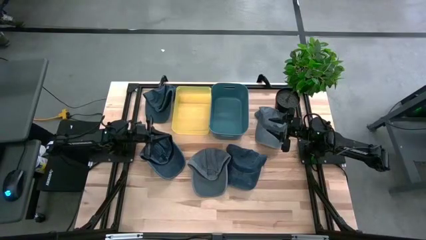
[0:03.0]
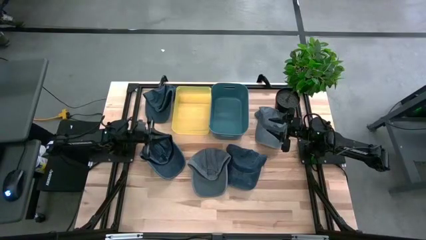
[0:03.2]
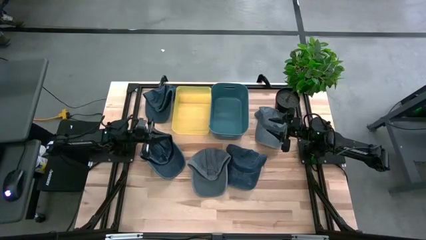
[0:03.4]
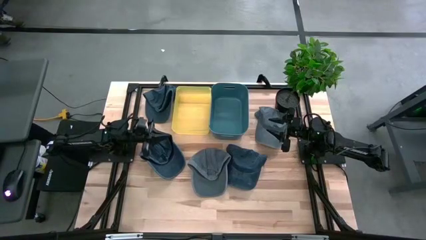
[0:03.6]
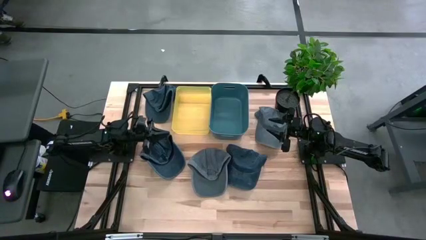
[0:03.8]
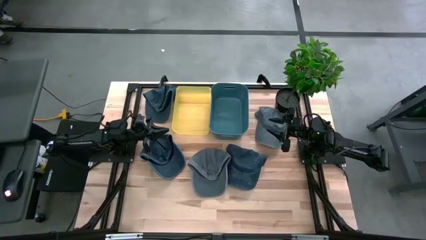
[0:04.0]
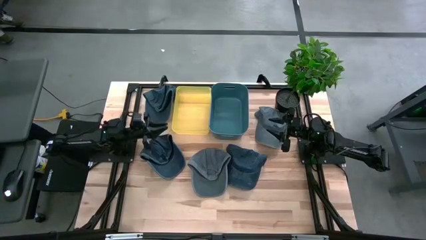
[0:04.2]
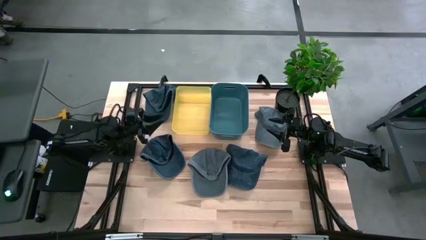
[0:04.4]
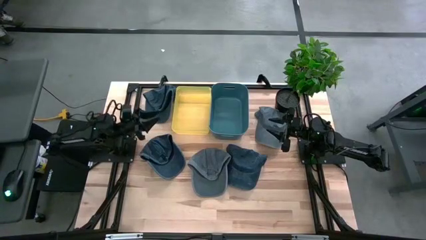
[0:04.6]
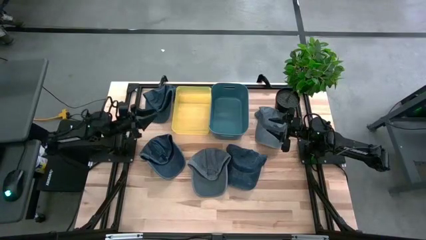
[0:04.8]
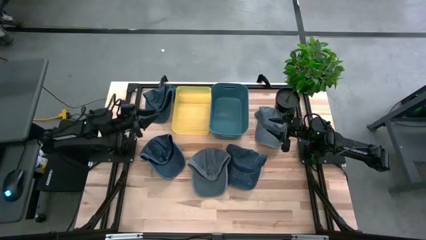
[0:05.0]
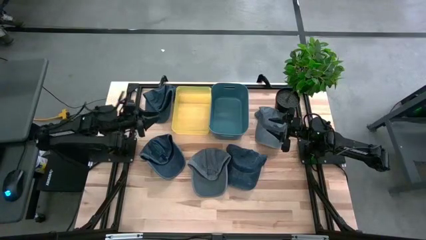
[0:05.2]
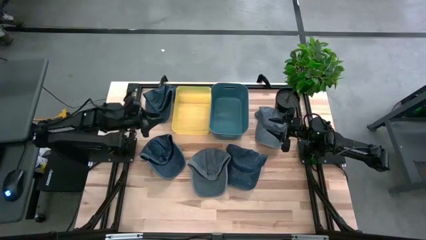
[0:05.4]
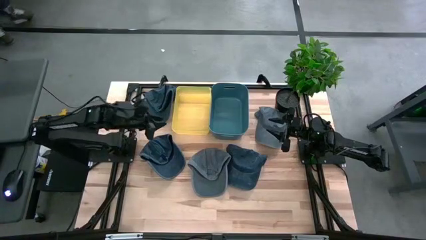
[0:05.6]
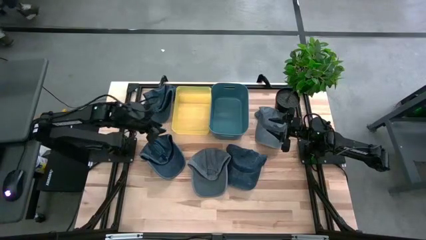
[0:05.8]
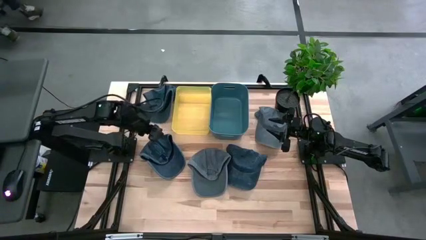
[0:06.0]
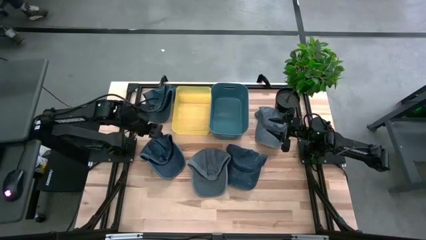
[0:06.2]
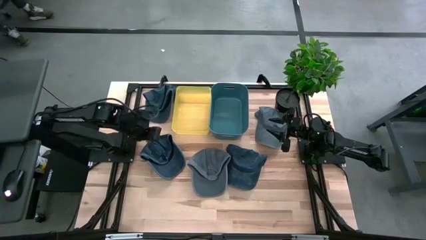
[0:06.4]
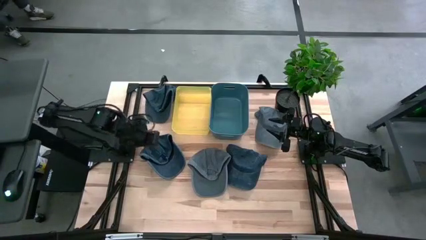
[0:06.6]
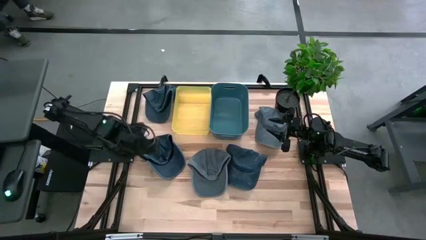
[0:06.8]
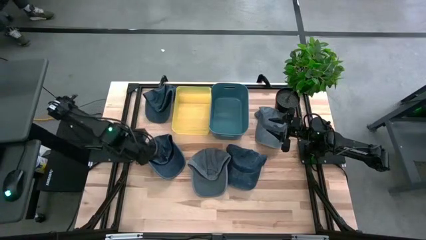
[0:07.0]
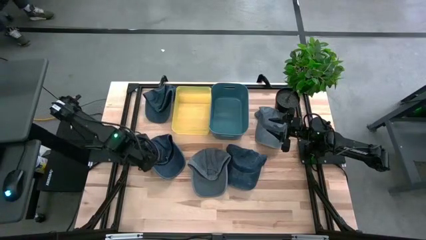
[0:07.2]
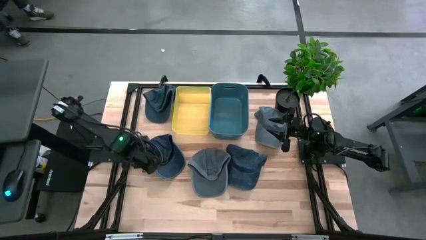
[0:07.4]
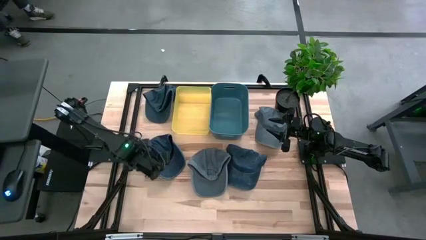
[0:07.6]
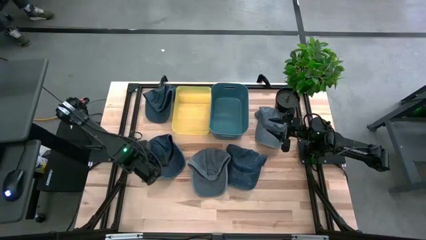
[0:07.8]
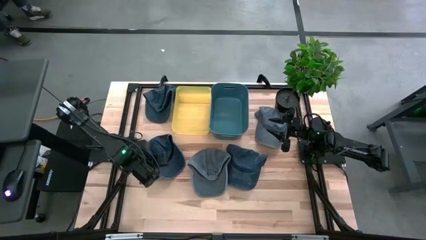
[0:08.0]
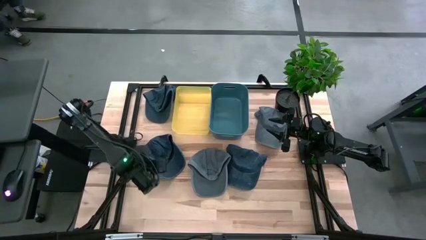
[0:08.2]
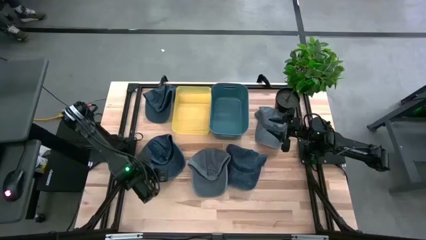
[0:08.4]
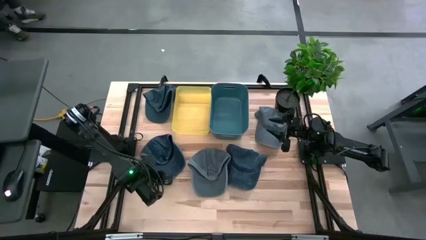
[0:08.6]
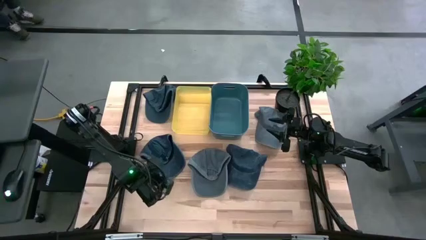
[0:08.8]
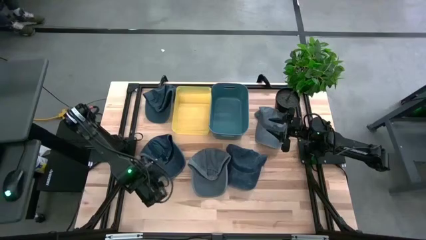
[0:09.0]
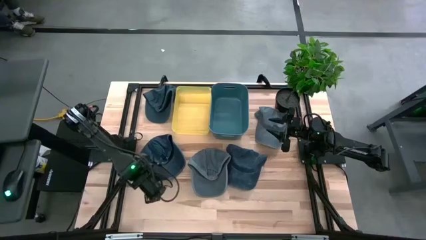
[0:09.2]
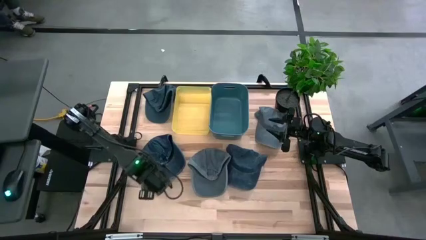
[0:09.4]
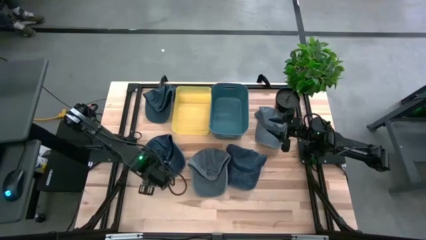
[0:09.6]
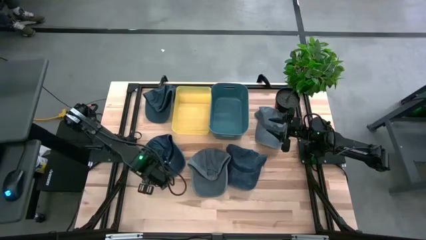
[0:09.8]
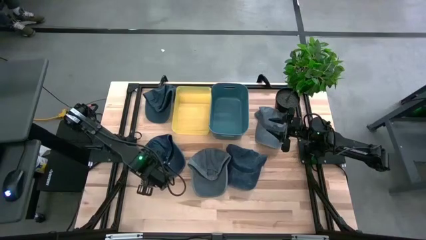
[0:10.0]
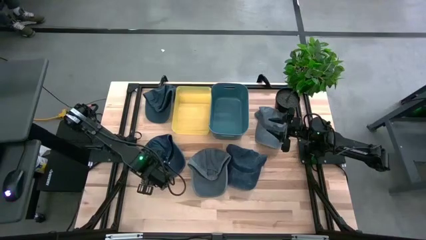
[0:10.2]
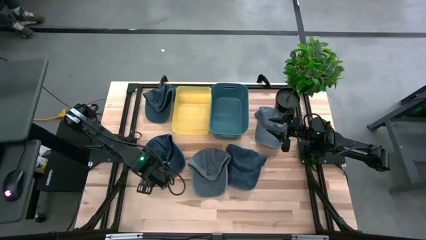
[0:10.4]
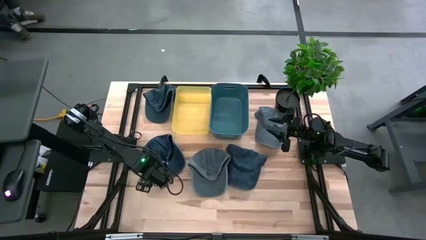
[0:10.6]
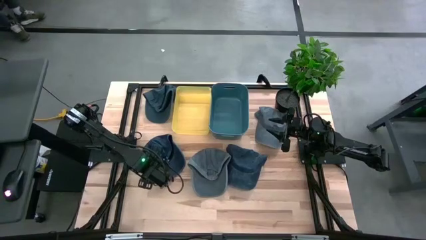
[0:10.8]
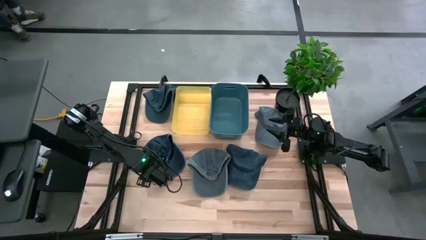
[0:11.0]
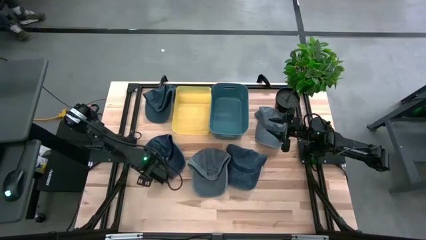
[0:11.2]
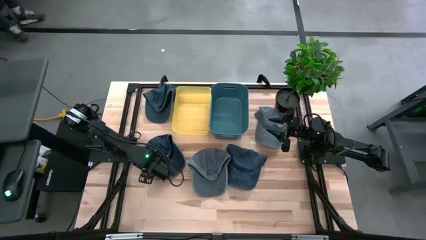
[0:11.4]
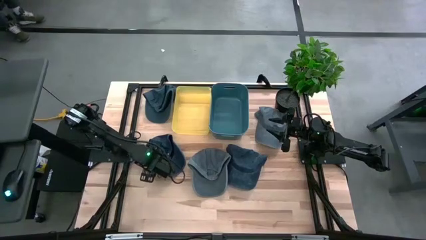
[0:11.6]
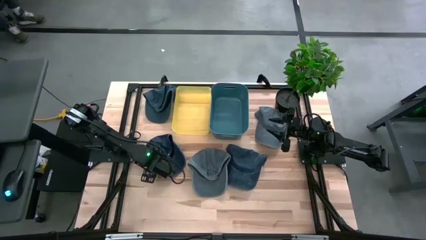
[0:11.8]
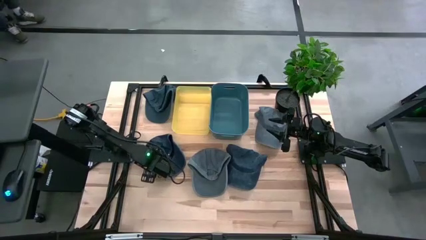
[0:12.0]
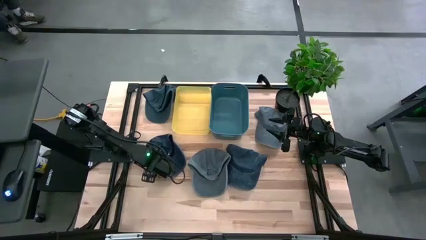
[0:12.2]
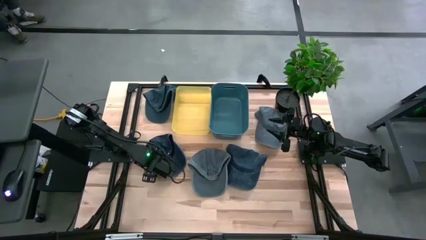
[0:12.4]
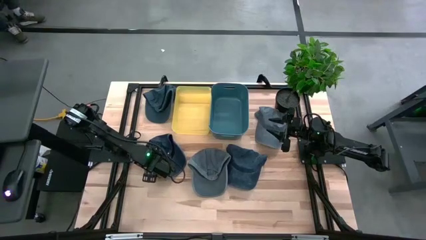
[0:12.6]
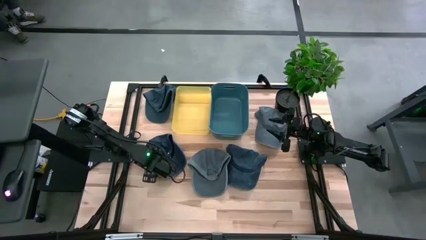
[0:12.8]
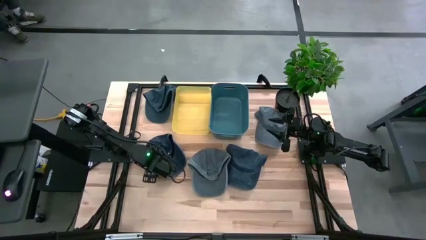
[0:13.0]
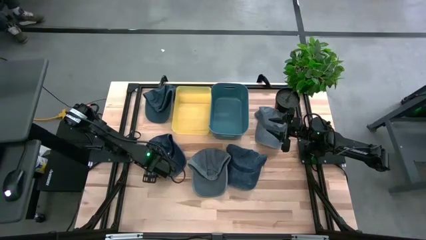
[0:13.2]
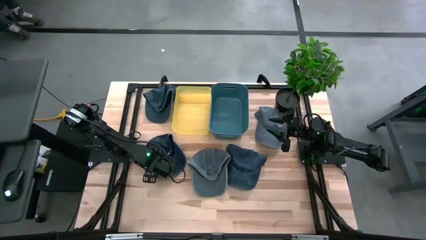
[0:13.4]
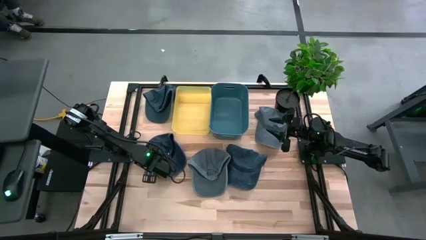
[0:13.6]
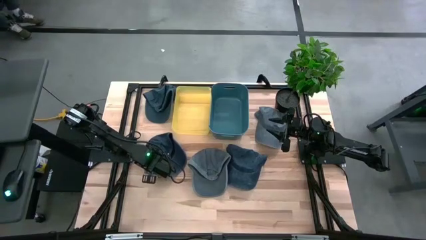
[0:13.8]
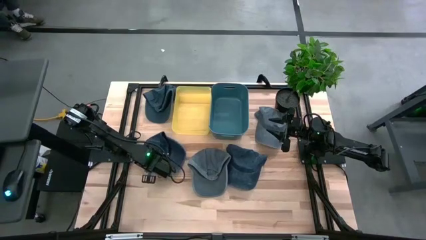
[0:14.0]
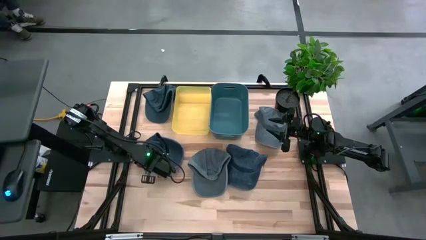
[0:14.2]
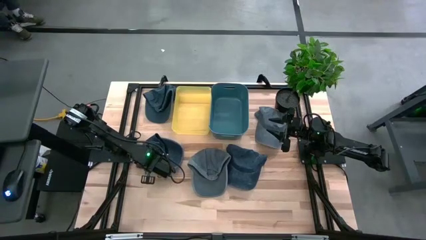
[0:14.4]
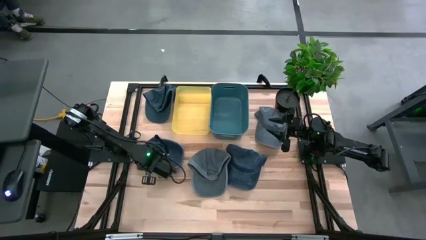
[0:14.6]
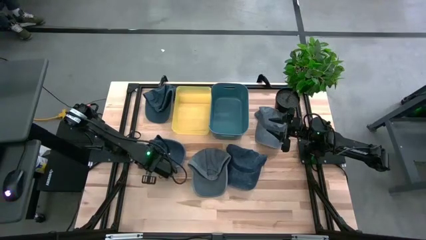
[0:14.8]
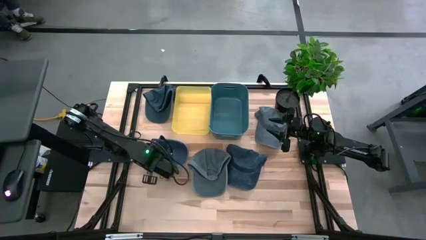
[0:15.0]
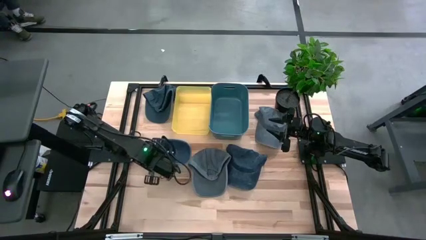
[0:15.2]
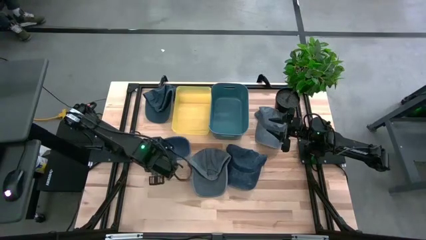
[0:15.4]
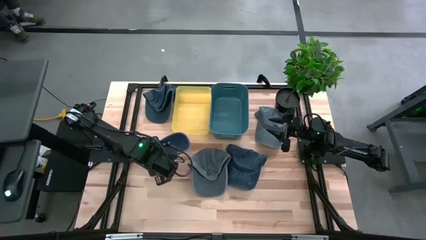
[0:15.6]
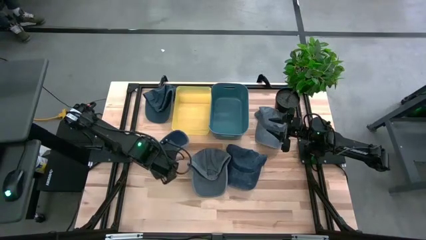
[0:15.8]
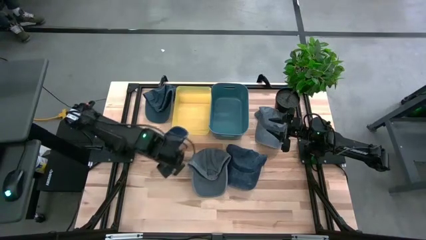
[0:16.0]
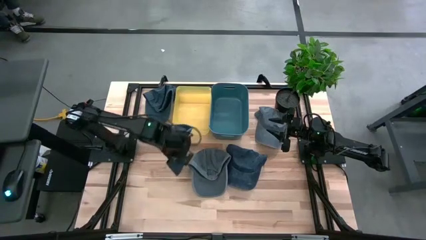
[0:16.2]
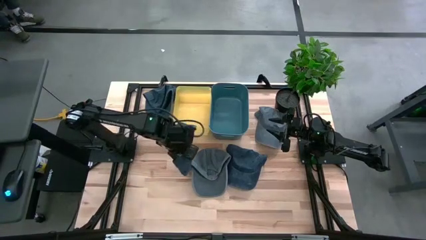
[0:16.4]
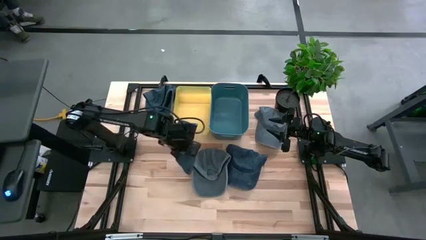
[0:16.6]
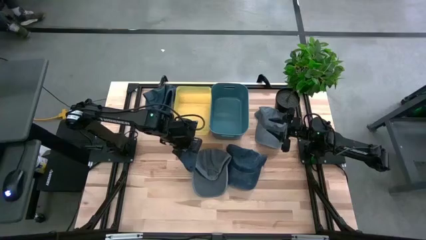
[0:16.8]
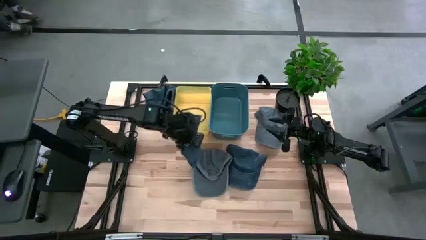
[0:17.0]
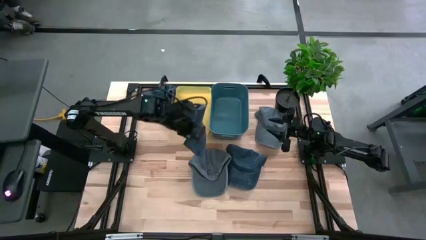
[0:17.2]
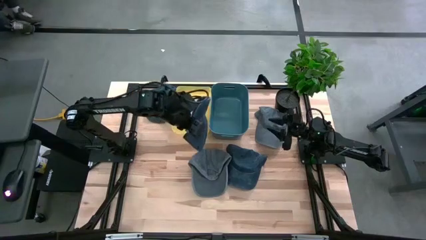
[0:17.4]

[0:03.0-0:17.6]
Task: Pick & Place hat
Put the bottom left blue cap into the yellow bin
